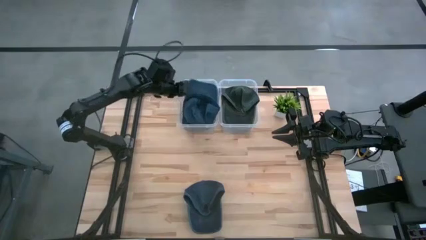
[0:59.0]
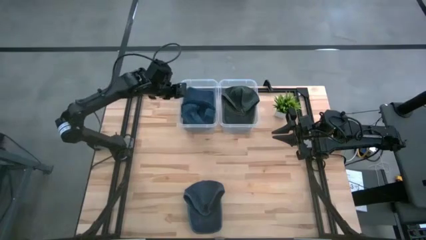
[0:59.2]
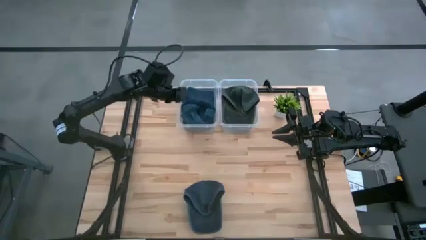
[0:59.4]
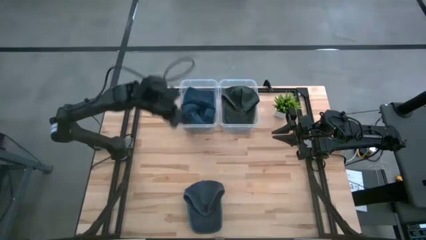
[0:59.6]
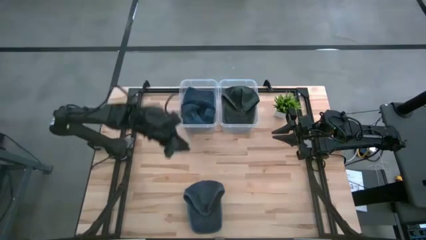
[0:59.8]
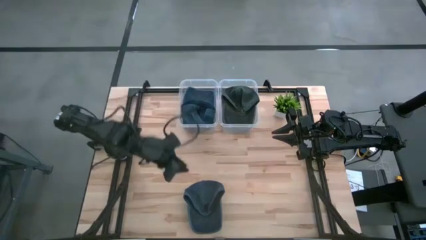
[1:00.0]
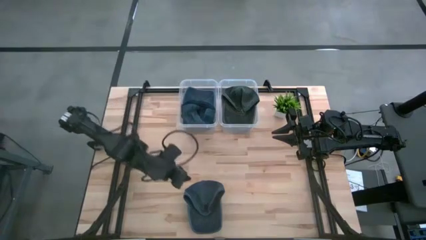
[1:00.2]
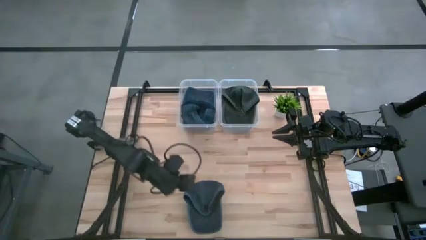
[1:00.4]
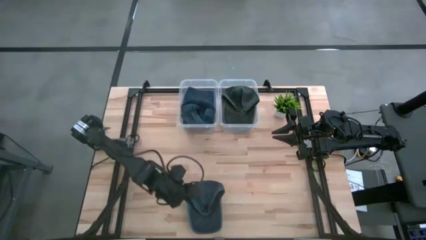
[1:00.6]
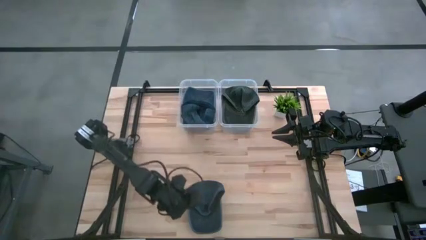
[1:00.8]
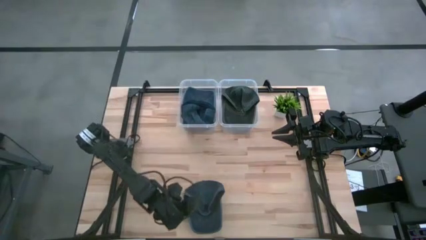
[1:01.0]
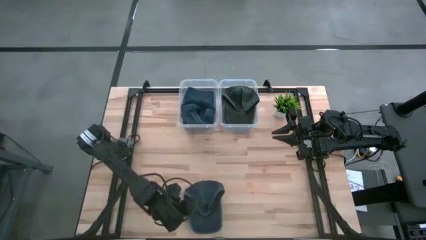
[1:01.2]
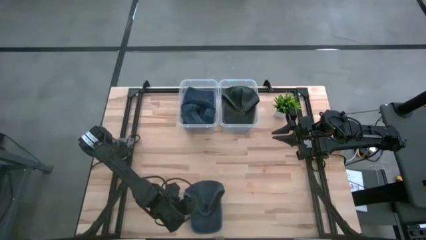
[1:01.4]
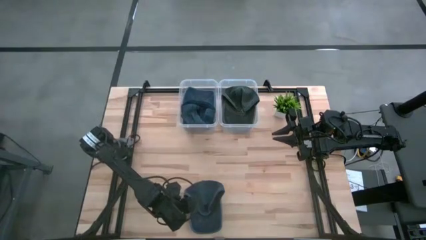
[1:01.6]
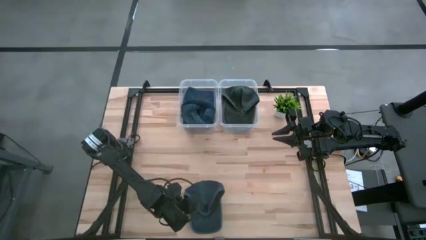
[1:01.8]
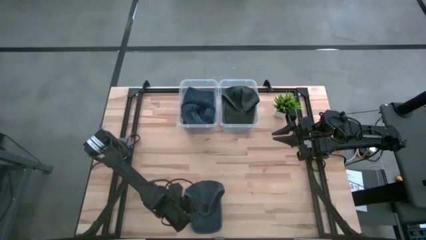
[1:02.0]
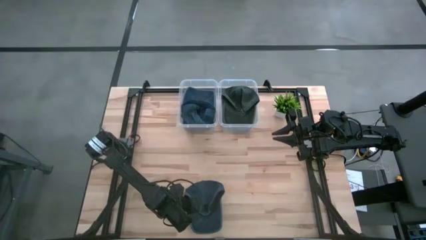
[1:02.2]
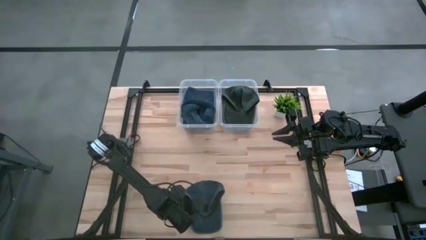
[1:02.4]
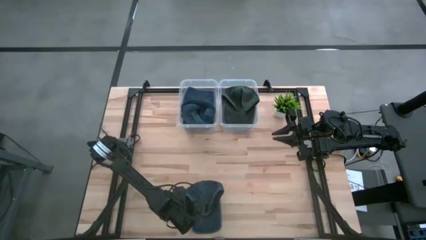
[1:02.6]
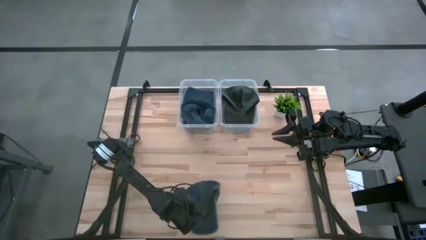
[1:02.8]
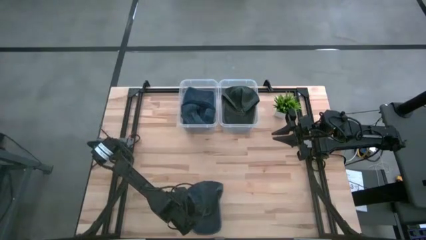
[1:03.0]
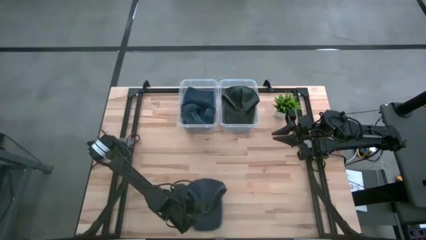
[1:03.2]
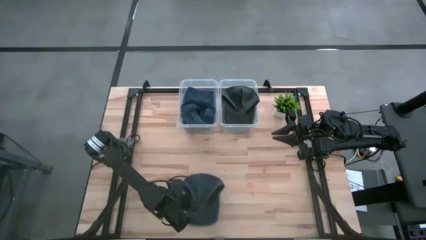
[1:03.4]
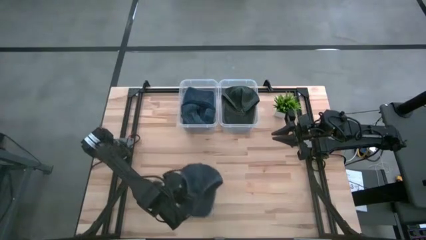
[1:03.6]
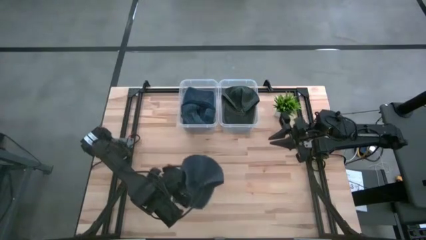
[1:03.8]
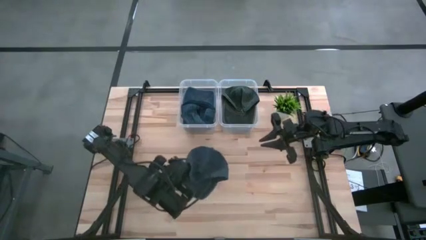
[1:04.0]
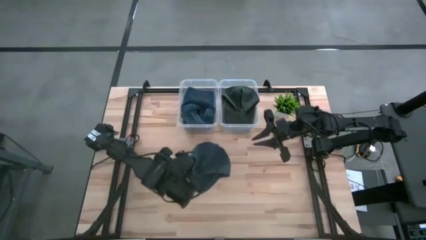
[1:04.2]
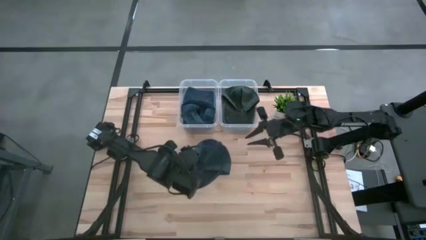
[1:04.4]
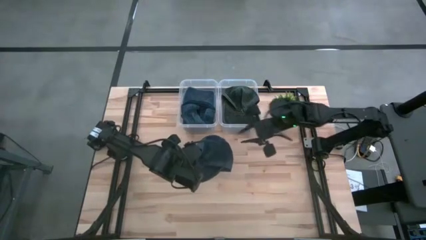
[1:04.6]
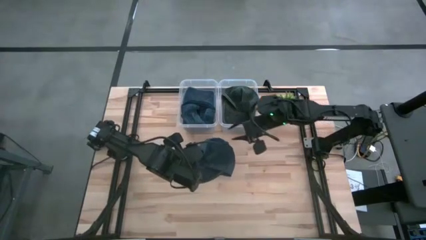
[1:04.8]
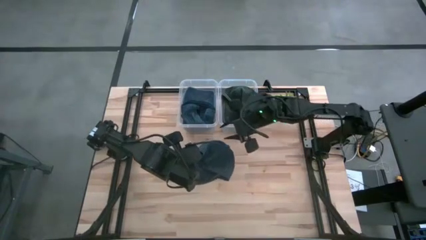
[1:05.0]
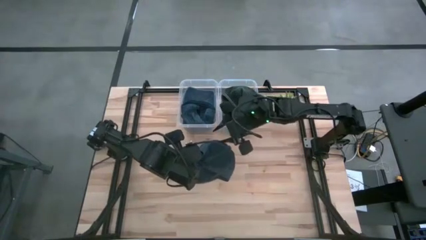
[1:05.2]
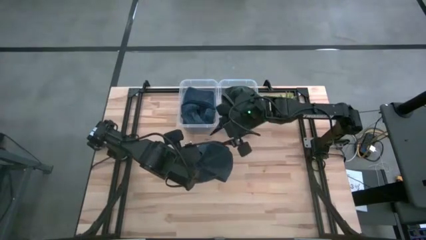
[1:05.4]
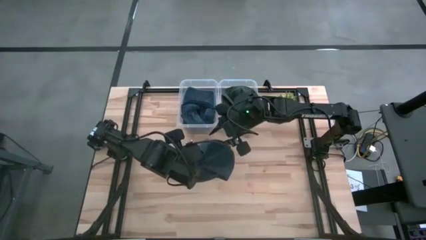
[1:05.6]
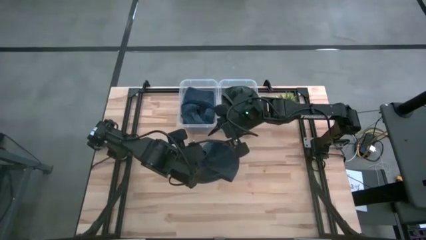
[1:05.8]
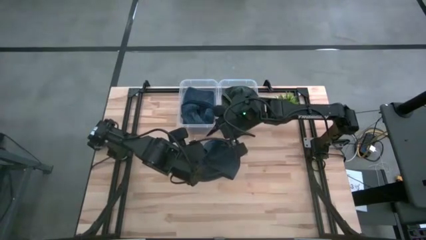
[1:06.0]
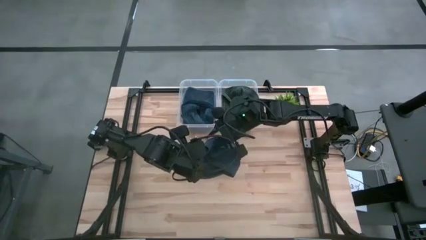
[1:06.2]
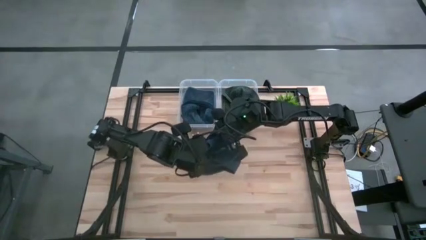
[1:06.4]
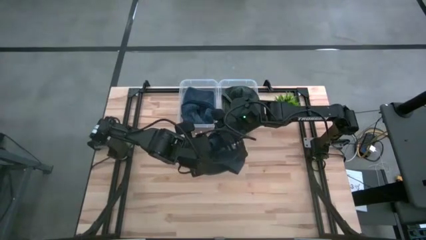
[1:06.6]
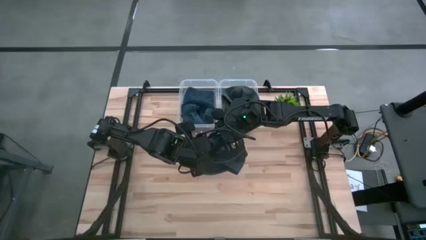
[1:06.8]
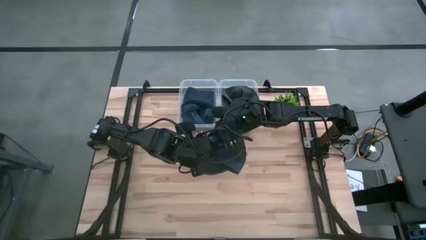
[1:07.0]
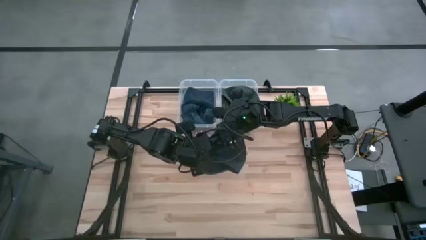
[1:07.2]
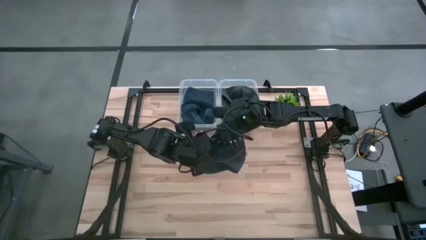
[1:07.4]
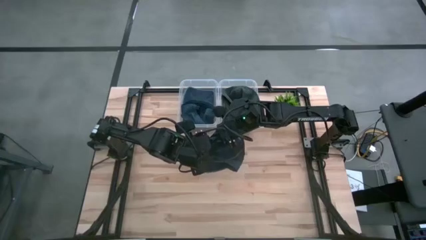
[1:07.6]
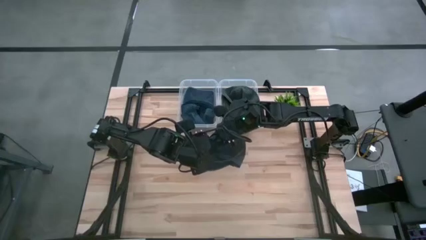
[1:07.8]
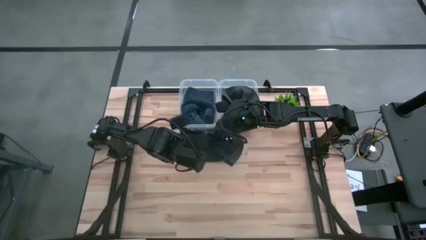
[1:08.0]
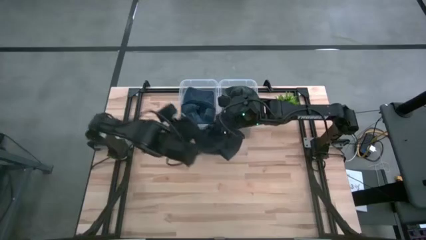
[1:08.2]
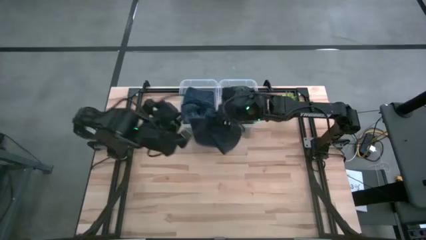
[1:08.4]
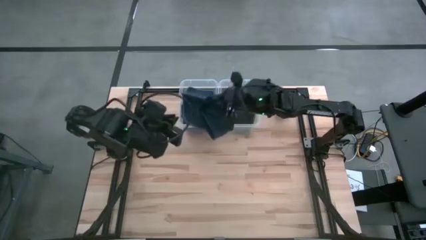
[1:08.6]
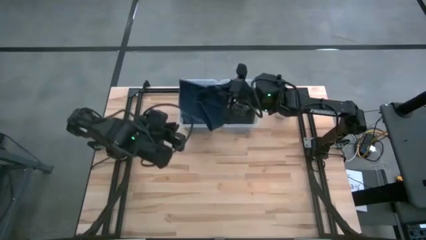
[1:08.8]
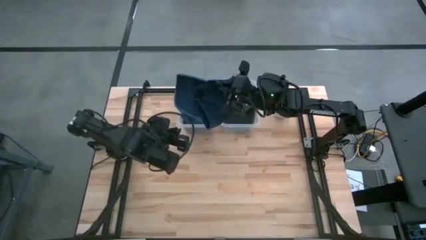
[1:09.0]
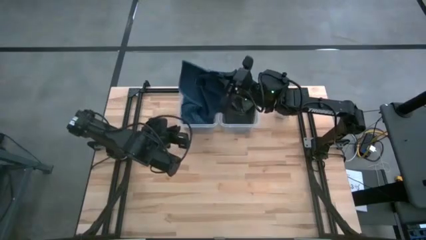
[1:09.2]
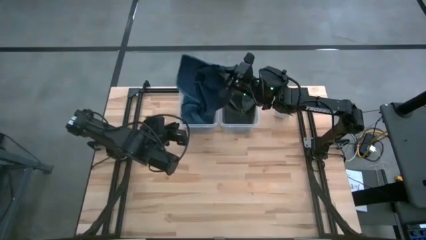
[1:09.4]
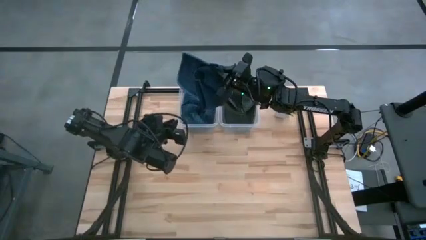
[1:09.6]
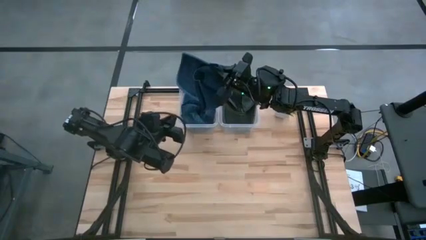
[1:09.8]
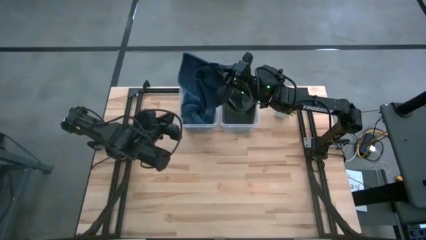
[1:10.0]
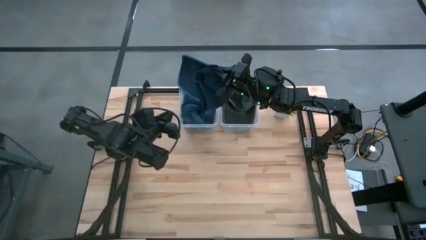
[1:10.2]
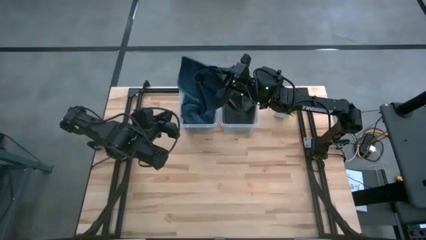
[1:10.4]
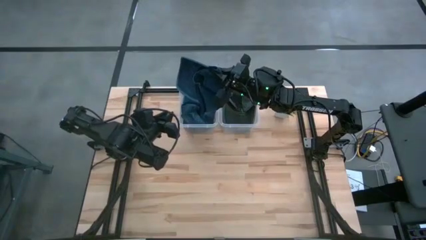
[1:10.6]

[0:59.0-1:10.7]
Task: Pick & Place hat
Put the blue cap into the left transparent bin

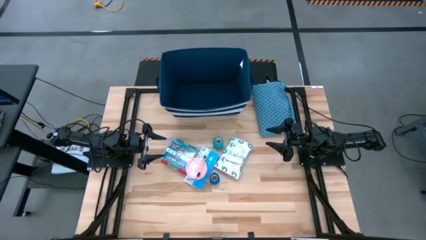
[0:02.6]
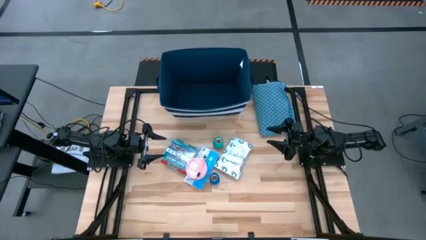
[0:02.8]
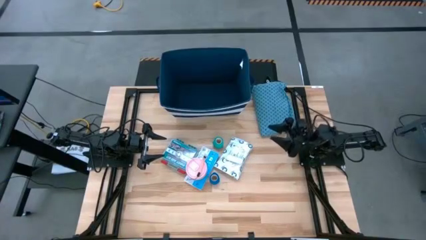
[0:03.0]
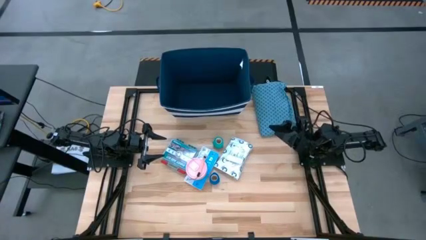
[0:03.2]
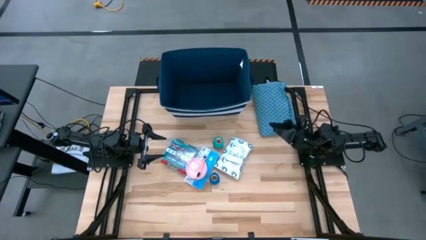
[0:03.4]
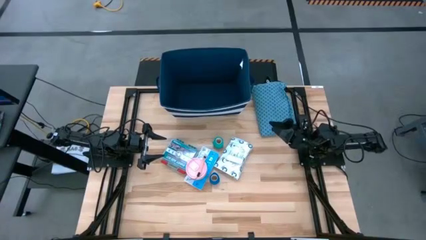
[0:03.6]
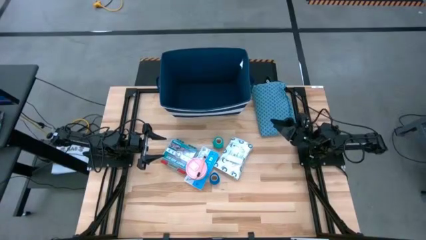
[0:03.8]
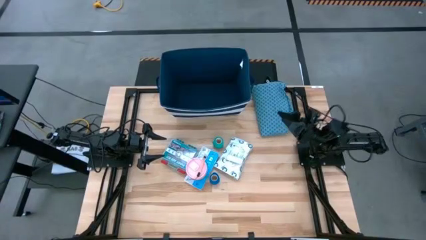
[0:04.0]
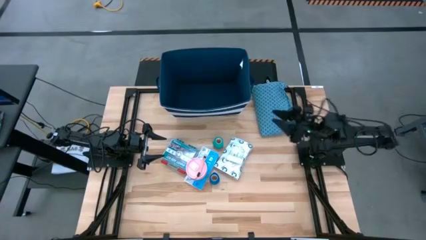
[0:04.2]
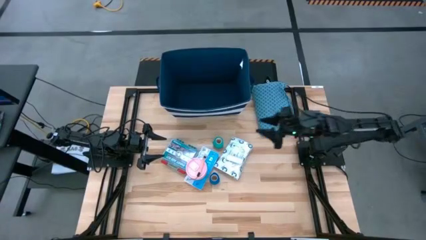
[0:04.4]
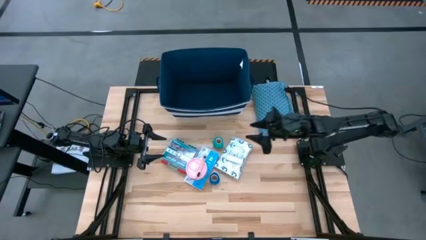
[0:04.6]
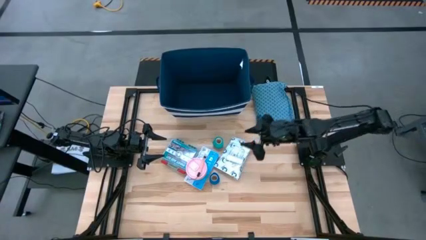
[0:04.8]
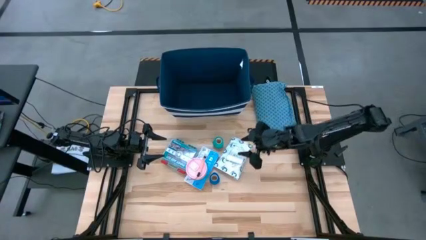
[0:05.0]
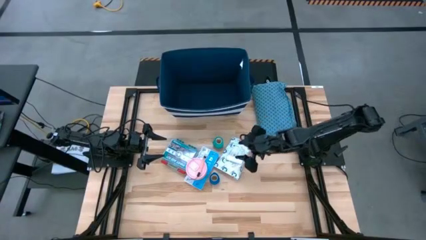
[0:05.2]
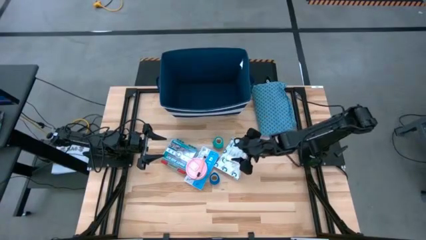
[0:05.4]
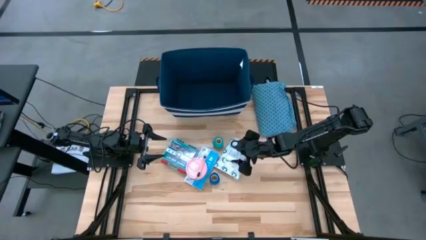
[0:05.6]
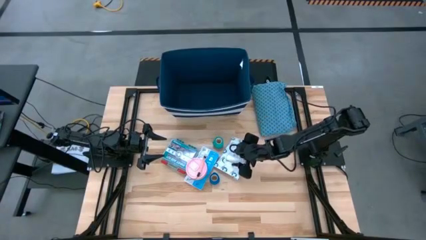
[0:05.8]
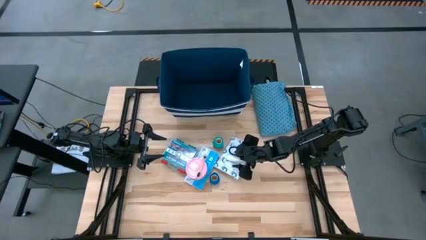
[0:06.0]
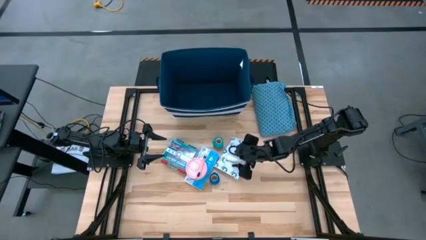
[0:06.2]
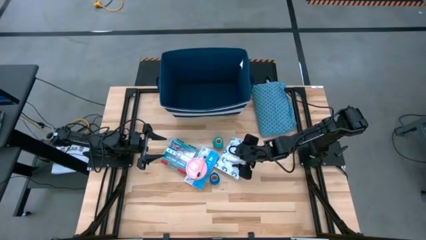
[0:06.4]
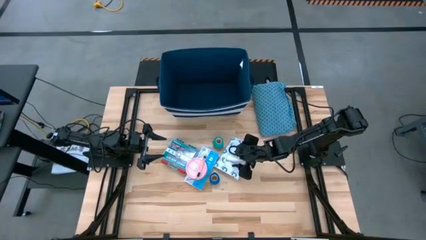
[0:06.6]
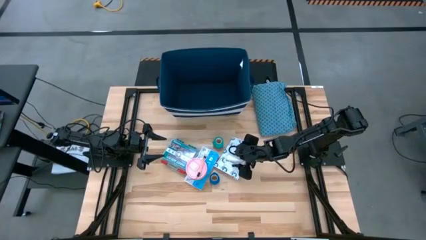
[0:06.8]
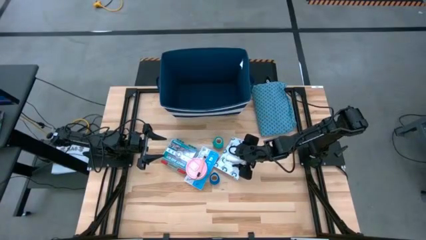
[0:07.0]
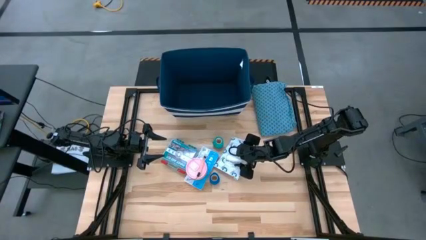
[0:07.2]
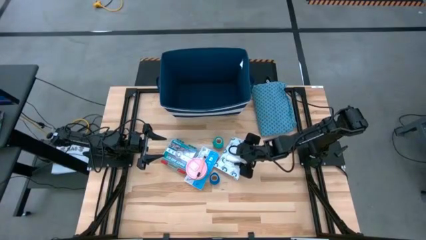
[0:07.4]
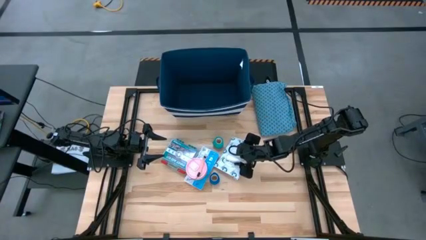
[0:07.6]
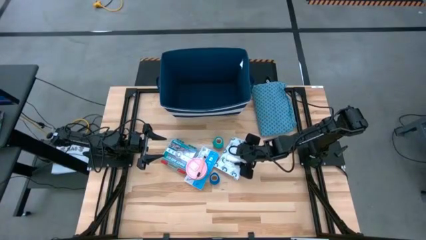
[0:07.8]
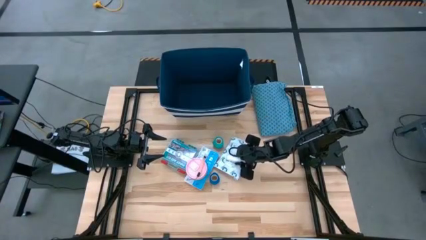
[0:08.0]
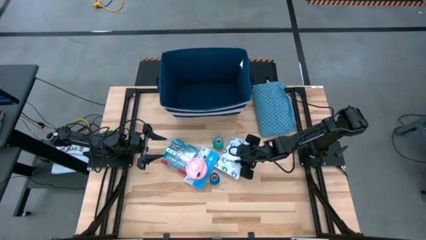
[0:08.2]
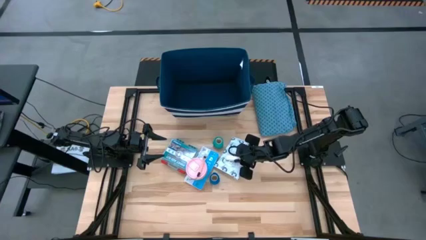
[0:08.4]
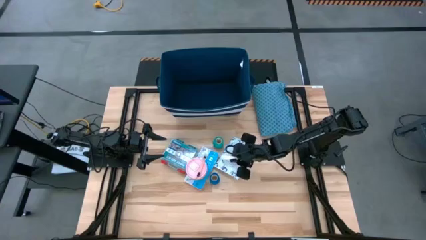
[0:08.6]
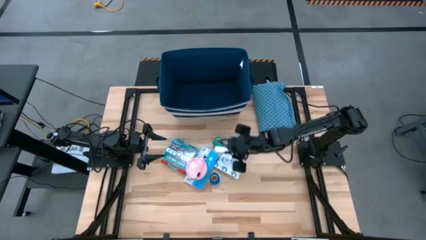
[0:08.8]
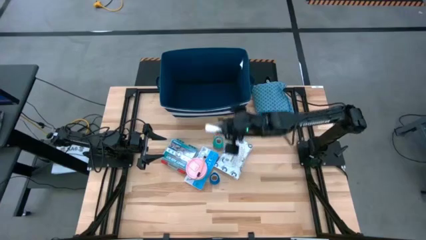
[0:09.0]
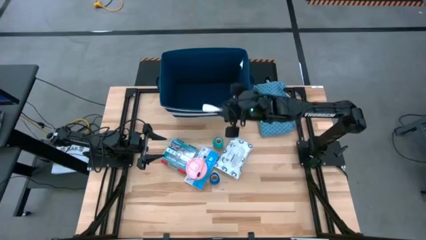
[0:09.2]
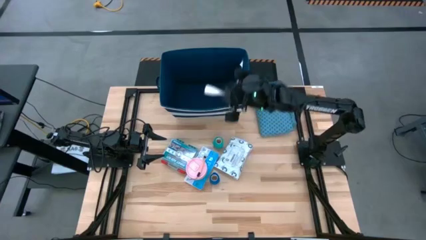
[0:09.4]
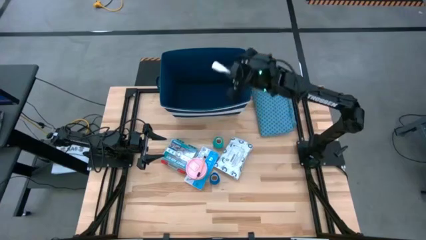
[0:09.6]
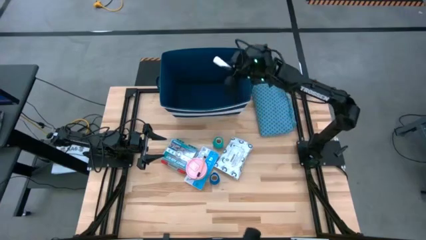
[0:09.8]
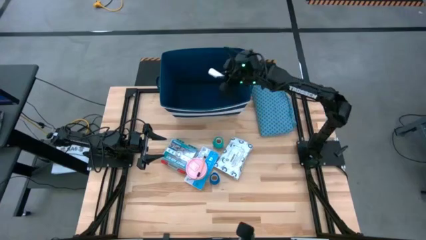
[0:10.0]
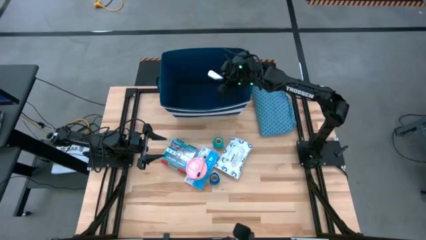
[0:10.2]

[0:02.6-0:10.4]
Task: Pack medical supplies into shirt
Put the rolled gauze bag into the blue patterned shirt
